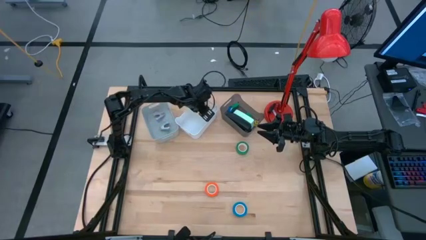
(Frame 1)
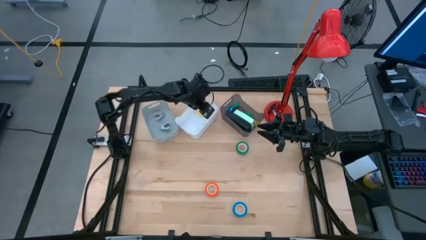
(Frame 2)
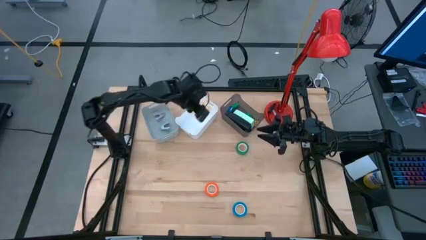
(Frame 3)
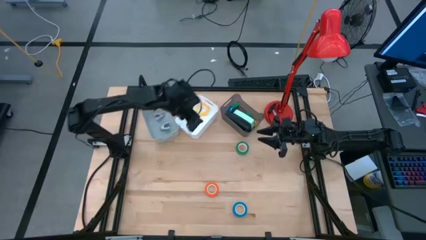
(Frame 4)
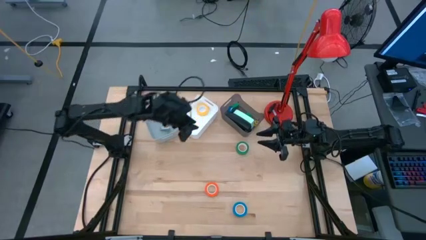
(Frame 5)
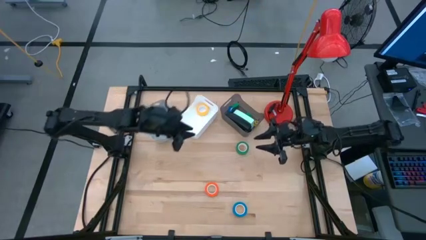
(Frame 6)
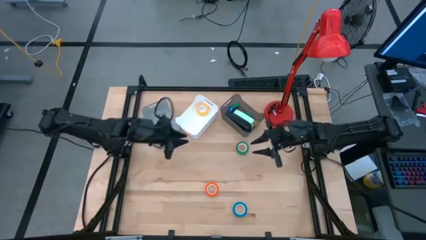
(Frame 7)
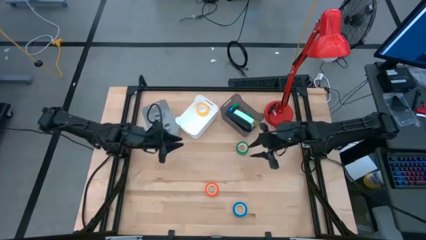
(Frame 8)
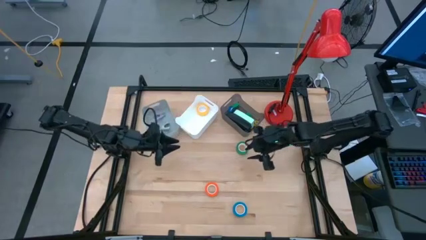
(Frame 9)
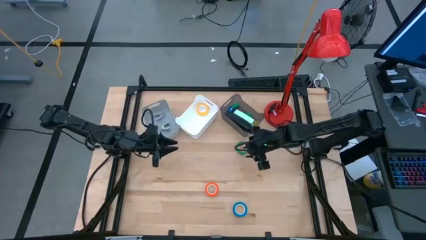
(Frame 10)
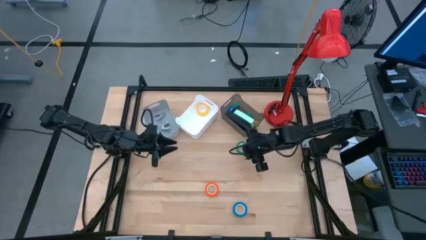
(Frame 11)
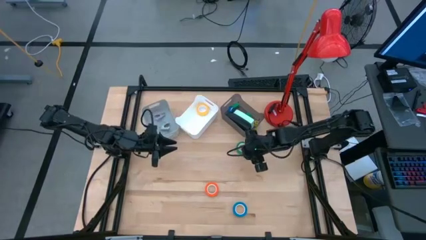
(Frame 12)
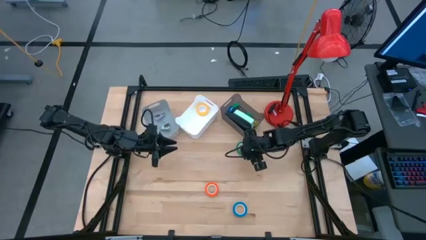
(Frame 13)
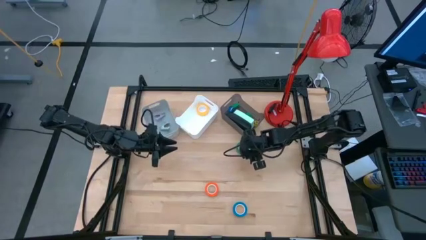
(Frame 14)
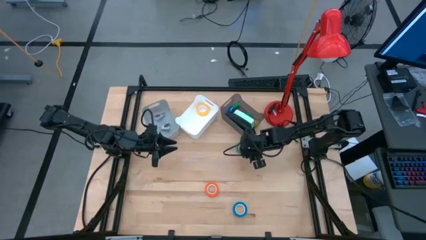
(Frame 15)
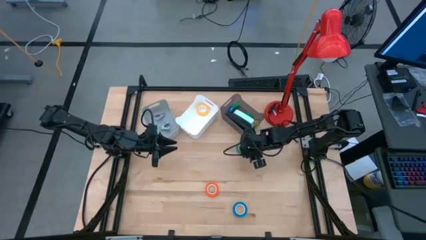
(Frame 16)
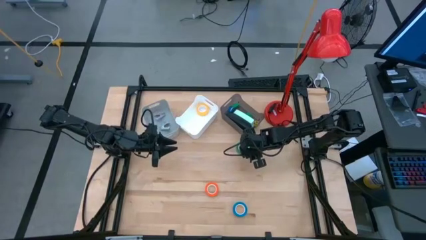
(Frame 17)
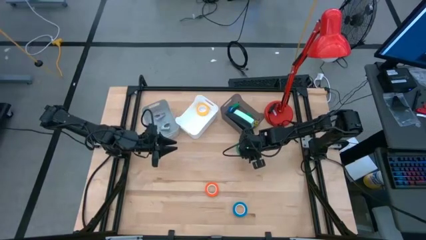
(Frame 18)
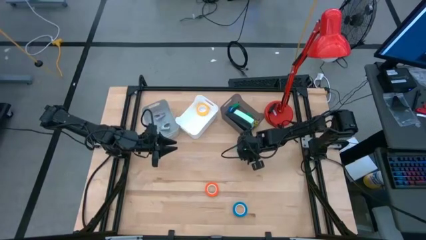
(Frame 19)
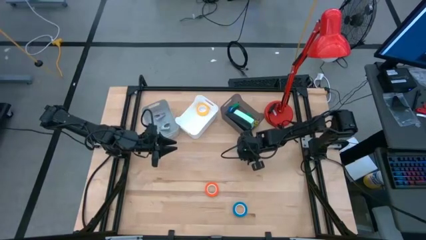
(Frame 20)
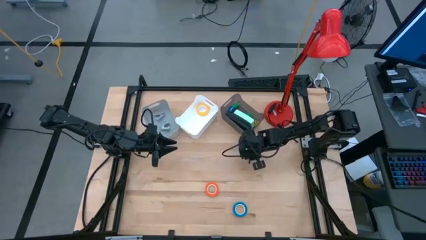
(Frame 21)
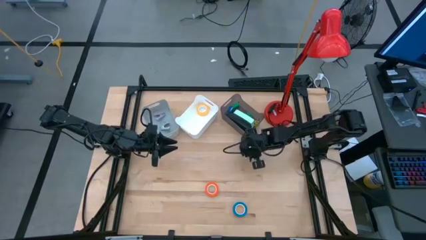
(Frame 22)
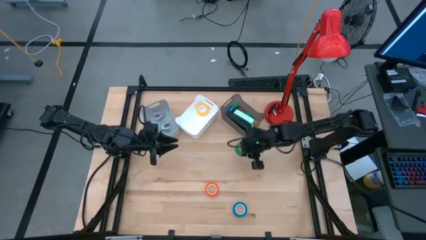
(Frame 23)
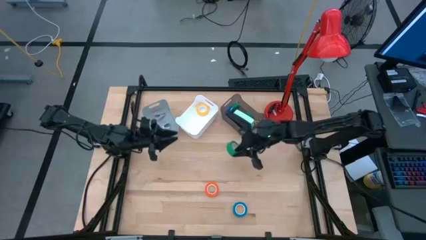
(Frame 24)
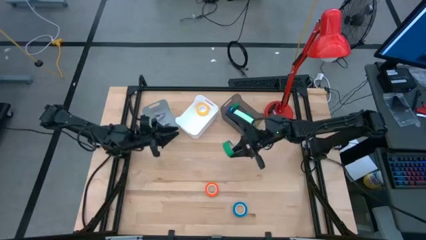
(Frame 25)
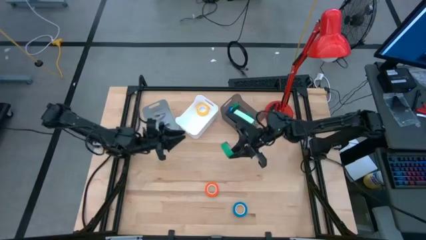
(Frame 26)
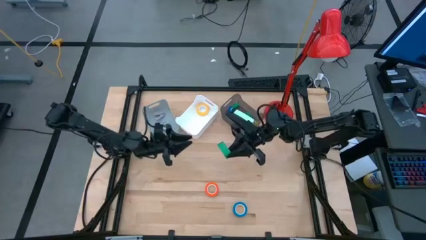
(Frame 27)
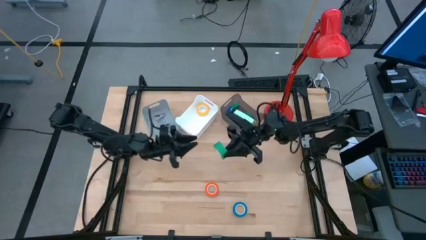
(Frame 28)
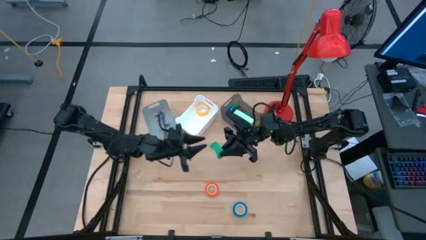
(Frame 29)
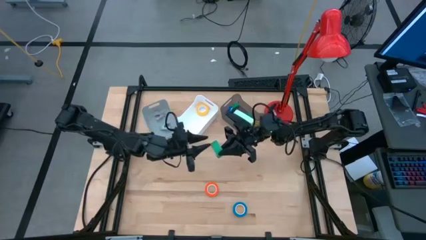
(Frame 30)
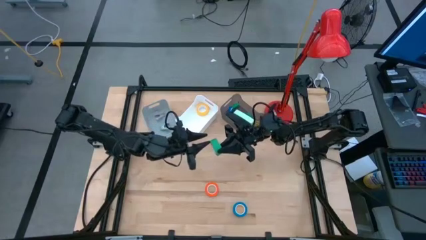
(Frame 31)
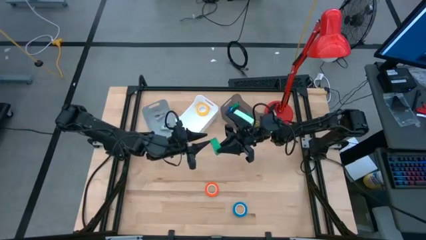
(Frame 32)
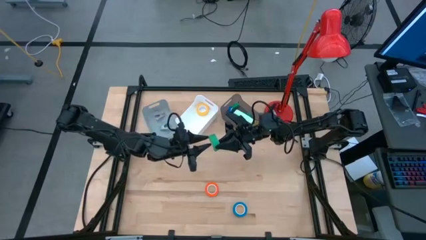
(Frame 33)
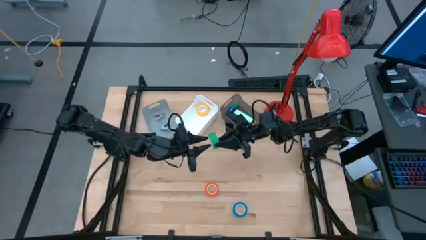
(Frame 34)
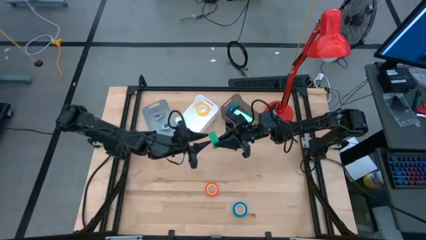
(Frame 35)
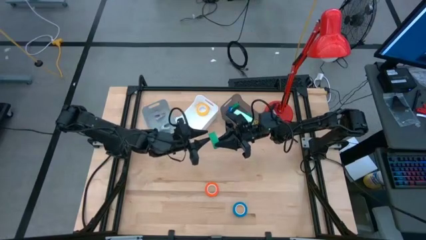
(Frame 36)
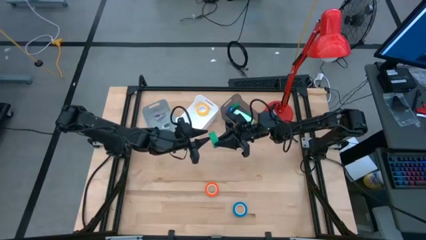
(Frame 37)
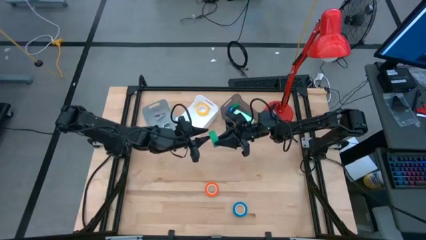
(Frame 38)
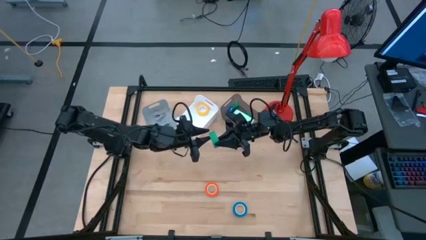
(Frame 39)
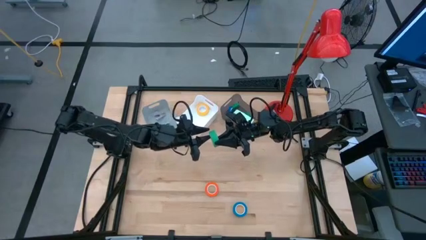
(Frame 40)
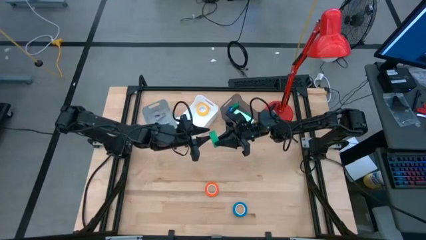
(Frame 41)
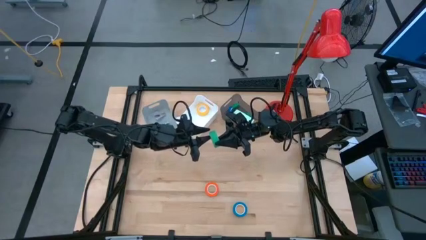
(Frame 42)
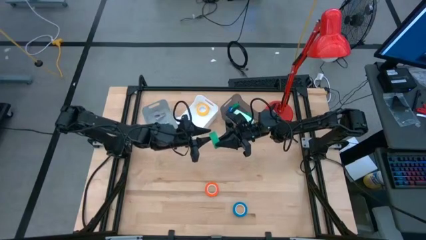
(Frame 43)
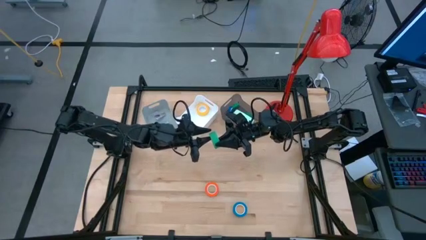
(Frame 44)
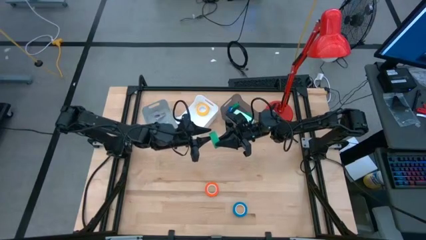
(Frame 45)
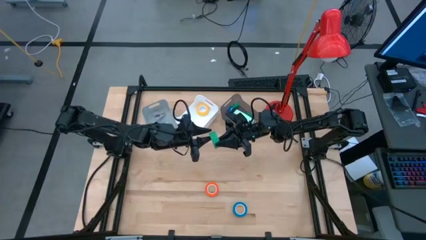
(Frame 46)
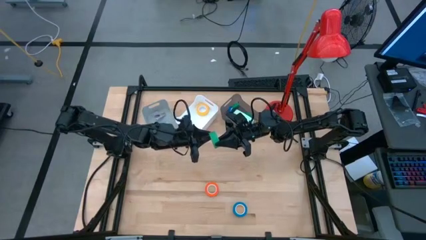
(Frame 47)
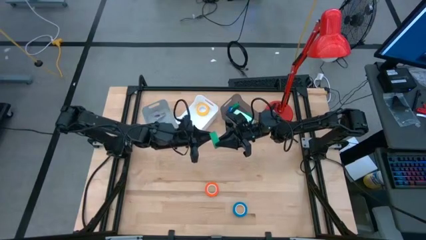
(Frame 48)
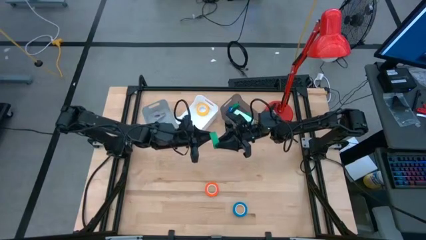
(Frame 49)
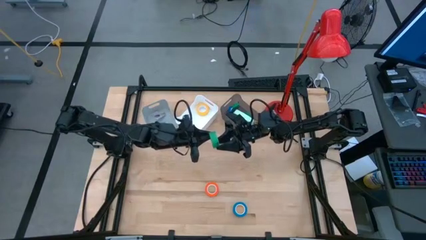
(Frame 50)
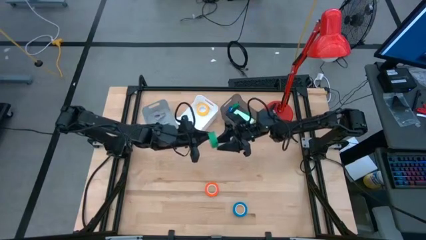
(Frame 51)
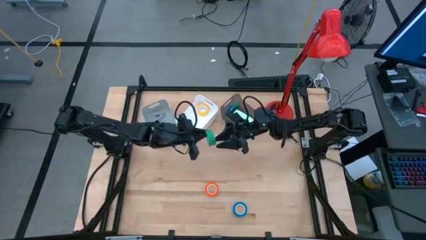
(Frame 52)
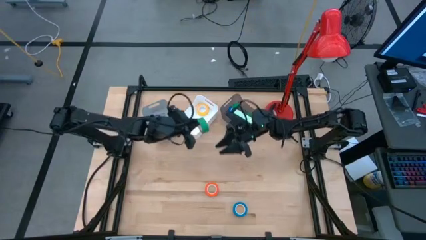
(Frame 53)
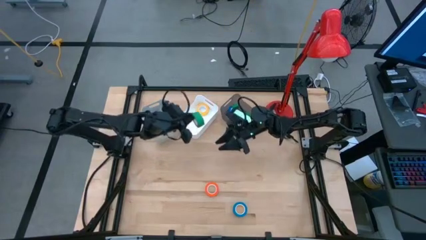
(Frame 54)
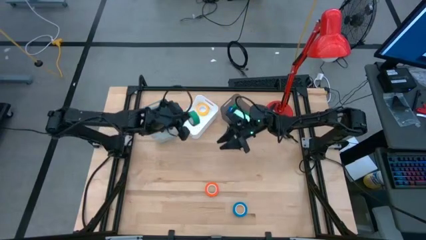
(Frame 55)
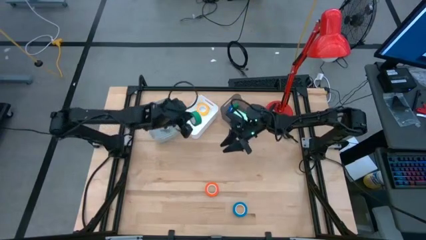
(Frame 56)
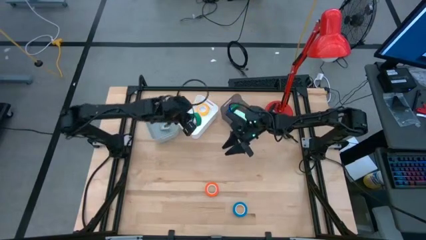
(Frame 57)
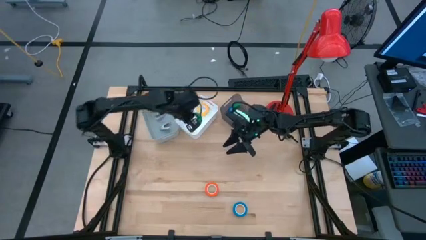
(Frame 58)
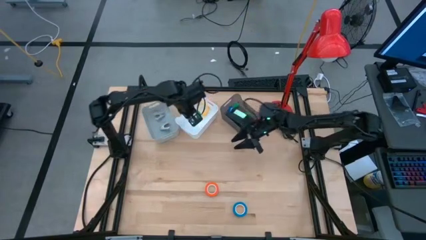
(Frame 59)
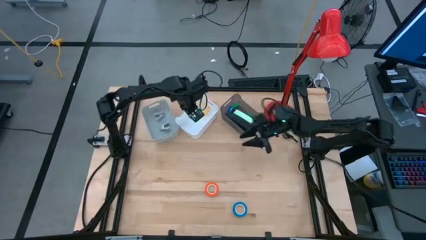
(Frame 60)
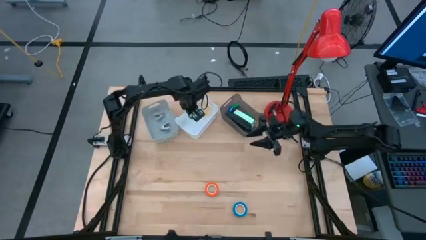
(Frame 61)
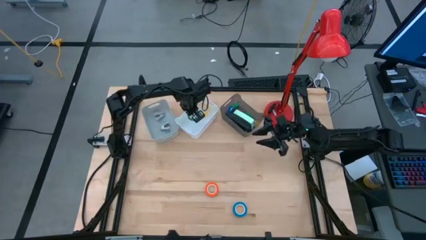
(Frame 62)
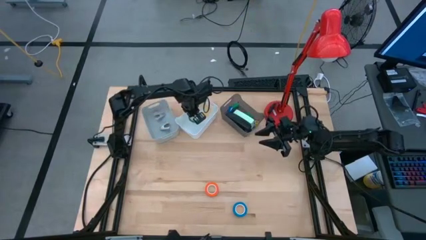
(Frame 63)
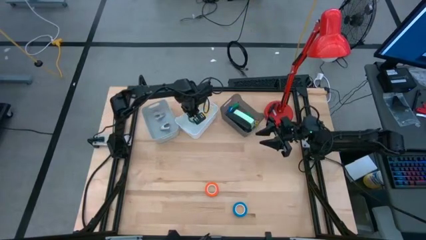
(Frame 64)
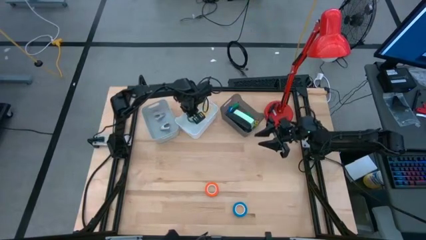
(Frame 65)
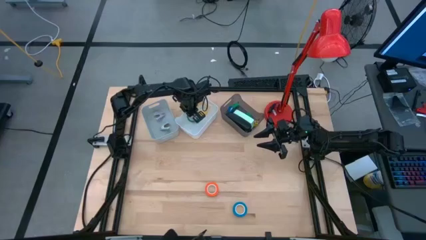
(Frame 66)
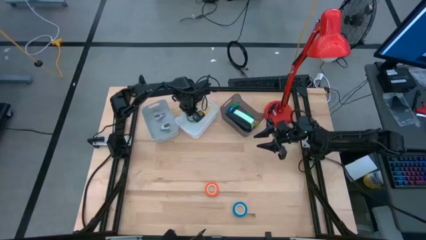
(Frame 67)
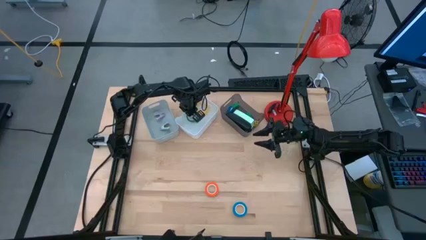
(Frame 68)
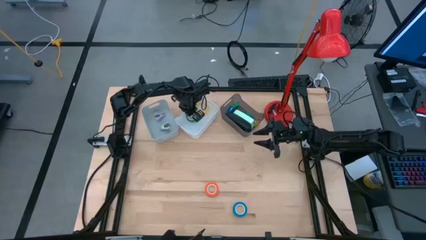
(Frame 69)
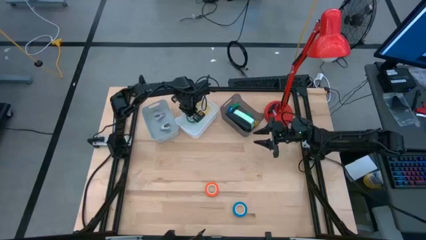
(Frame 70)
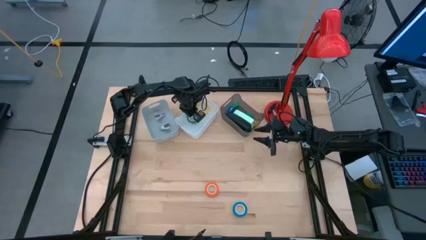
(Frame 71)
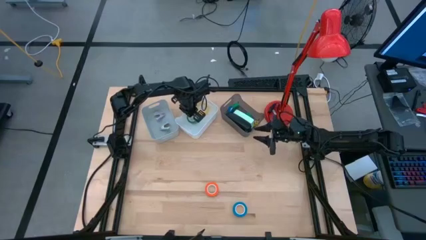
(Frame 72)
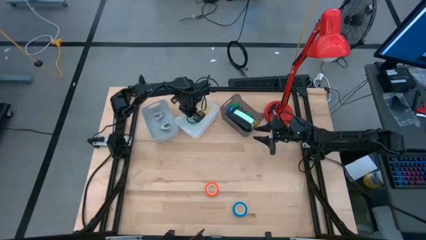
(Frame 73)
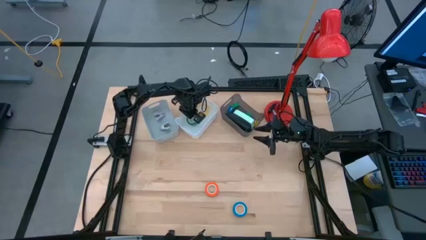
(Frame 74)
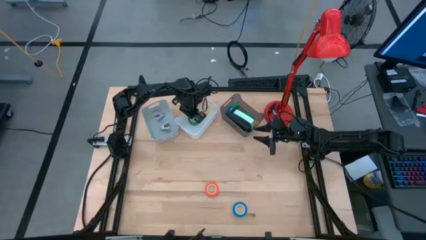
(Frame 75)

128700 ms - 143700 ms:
Task: Pick and place Stapler, Stapler remover, tape
Put the green tape into the white bin

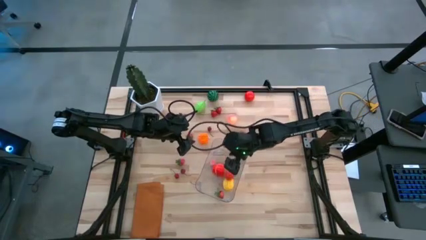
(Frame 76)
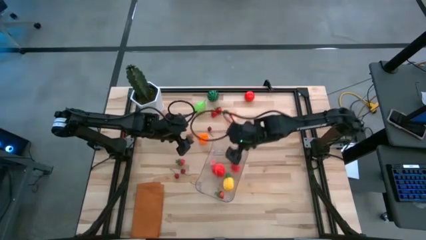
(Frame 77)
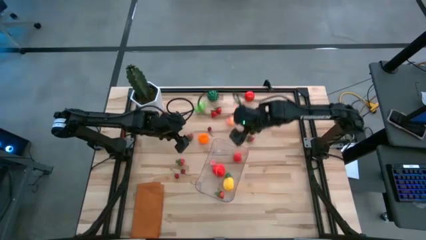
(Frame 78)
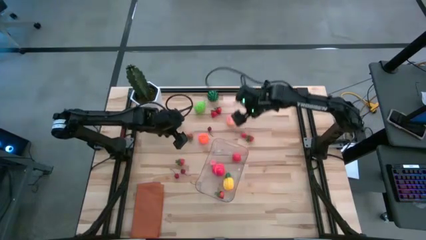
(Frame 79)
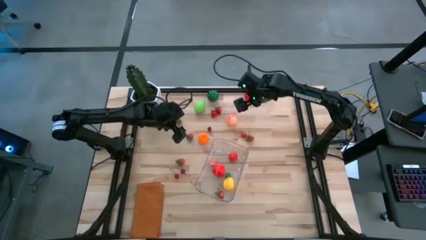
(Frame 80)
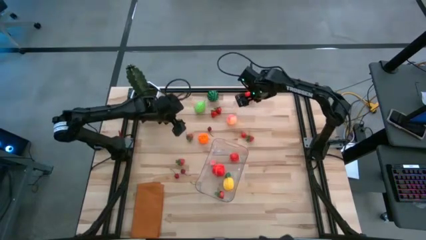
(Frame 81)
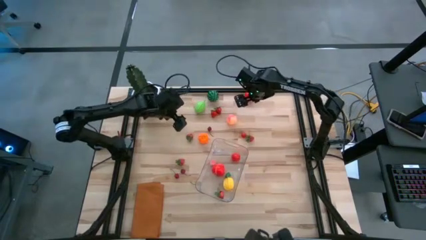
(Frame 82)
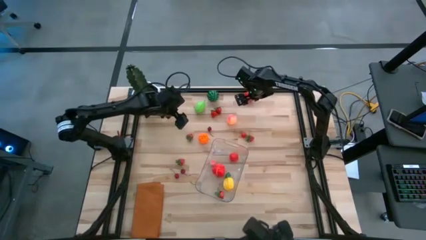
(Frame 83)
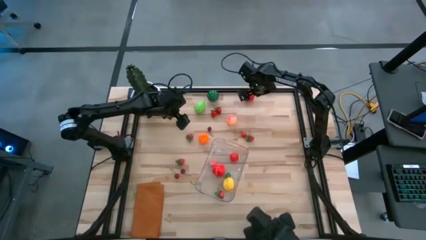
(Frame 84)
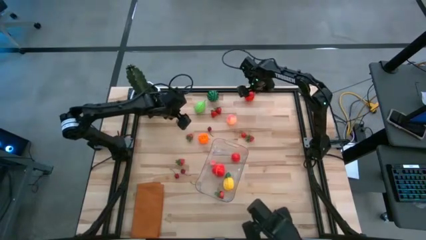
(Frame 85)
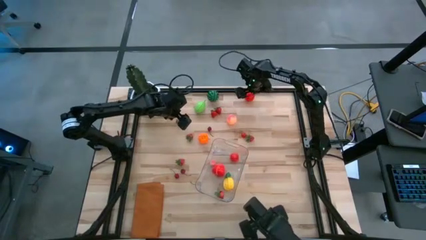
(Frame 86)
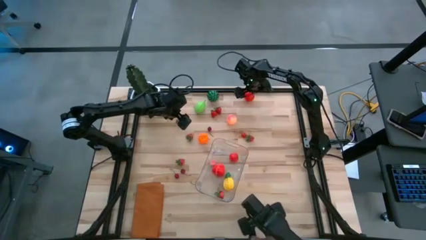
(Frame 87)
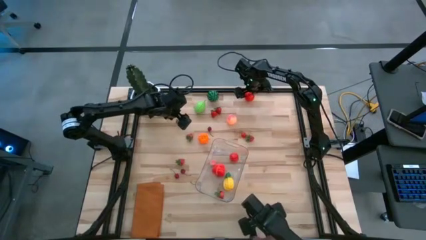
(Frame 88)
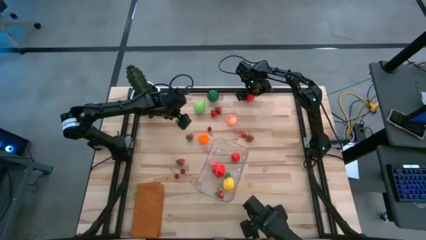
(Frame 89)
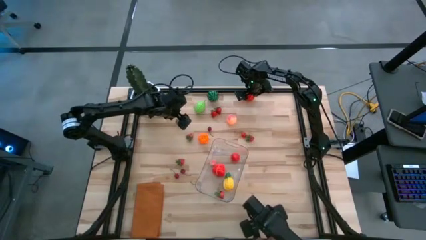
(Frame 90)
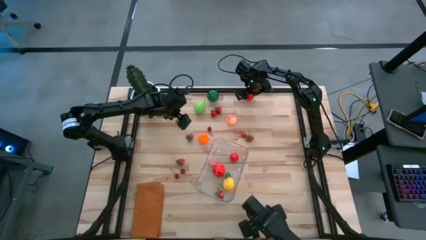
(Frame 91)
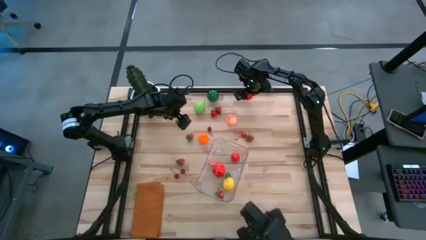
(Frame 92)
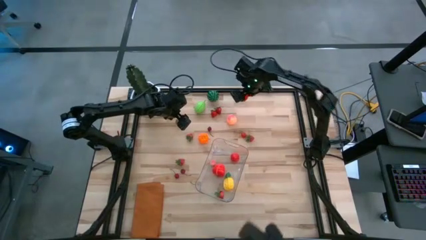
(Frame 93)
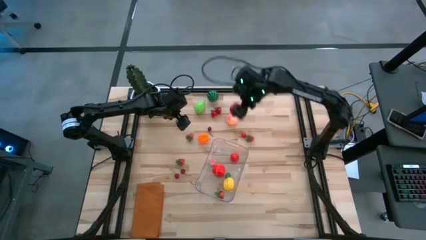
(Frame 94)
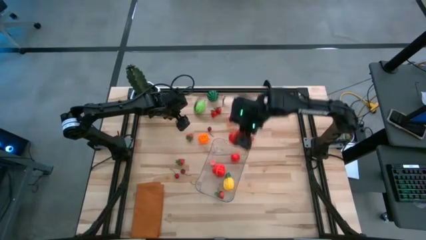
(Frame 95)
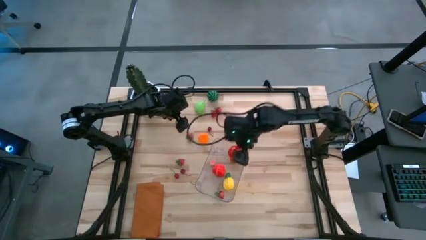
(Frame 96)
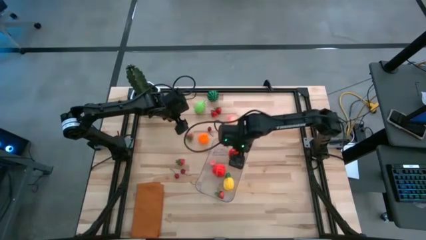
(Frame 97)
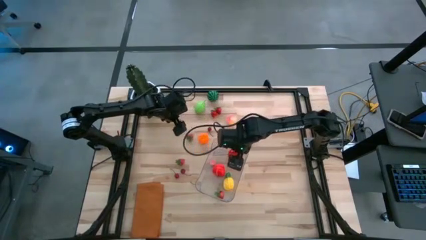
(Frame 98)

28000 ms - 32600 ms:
Task: Pick and placing Produce into tupperware
Put the red tomato into the transparent bin
